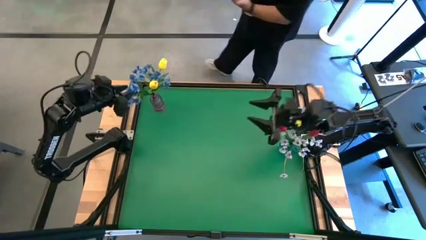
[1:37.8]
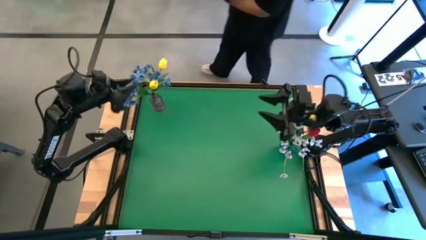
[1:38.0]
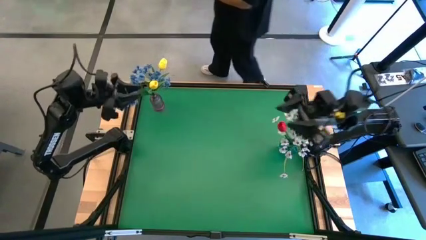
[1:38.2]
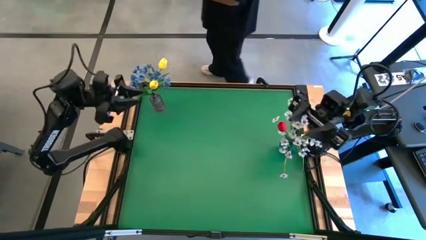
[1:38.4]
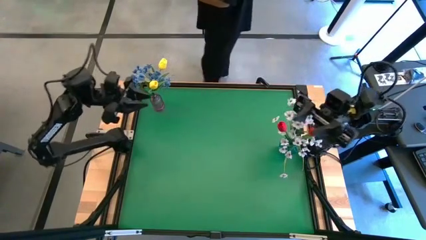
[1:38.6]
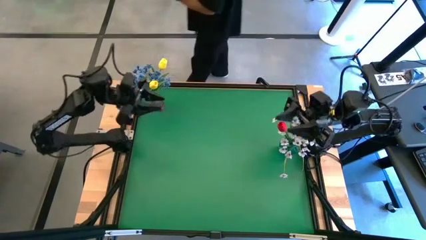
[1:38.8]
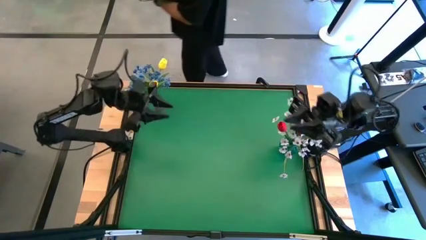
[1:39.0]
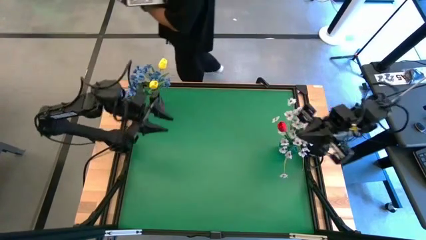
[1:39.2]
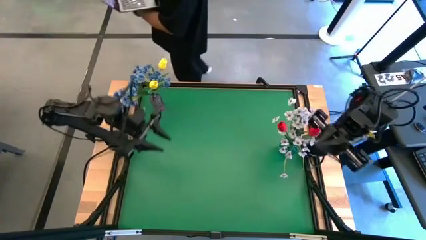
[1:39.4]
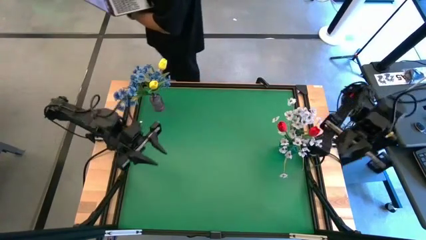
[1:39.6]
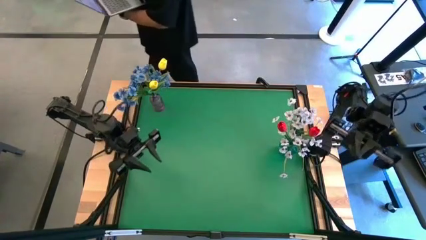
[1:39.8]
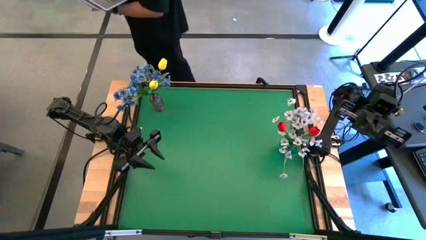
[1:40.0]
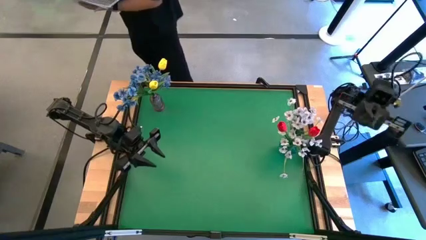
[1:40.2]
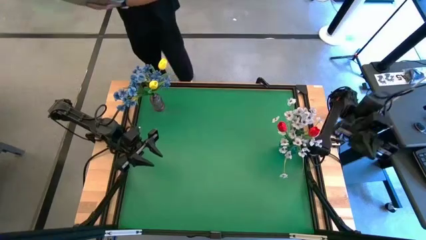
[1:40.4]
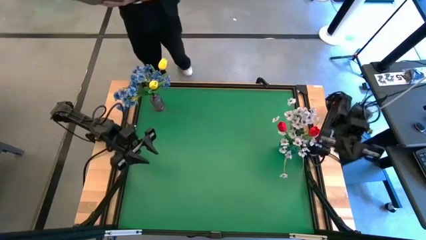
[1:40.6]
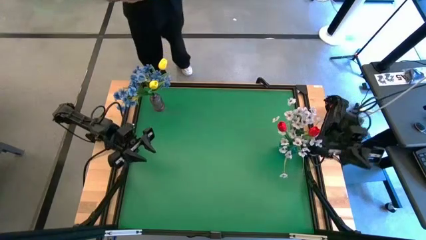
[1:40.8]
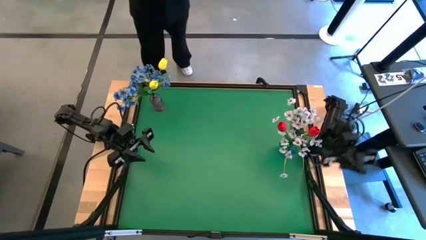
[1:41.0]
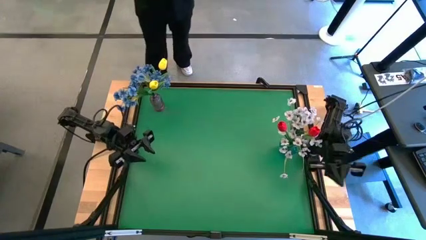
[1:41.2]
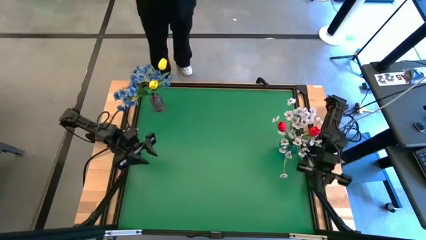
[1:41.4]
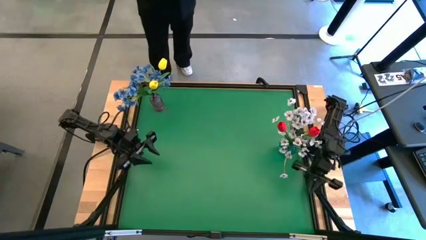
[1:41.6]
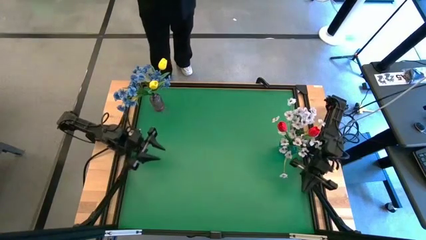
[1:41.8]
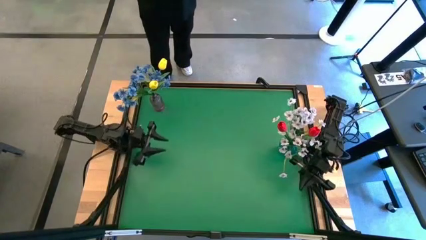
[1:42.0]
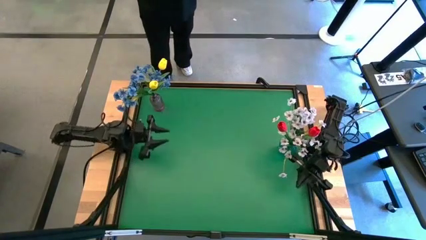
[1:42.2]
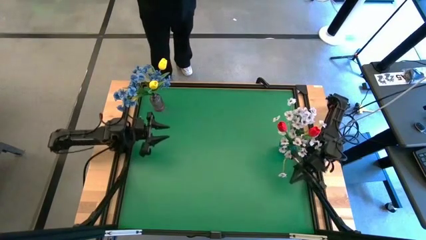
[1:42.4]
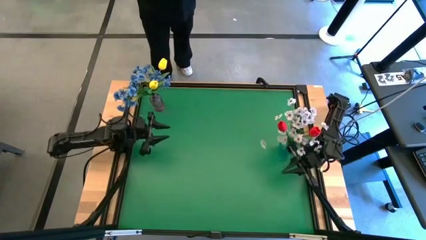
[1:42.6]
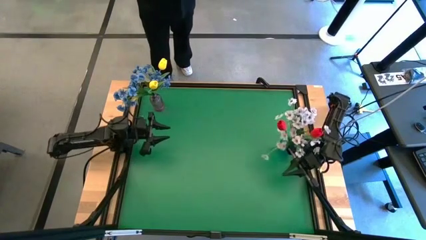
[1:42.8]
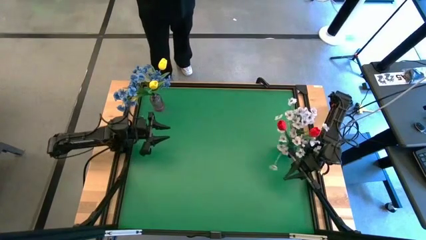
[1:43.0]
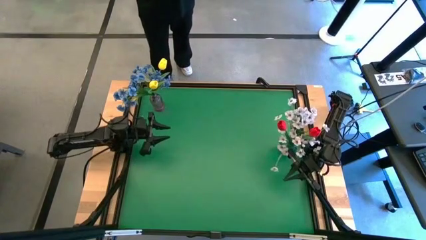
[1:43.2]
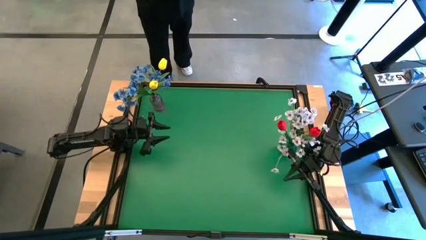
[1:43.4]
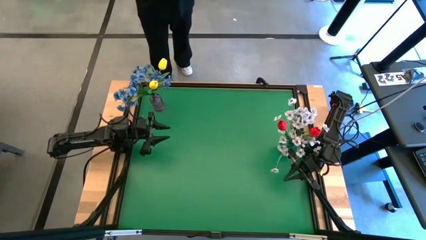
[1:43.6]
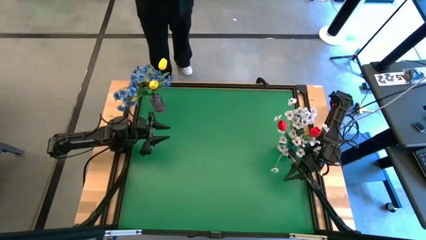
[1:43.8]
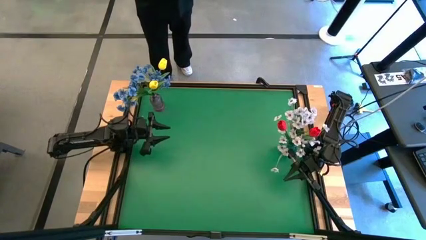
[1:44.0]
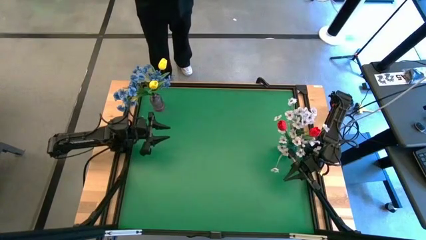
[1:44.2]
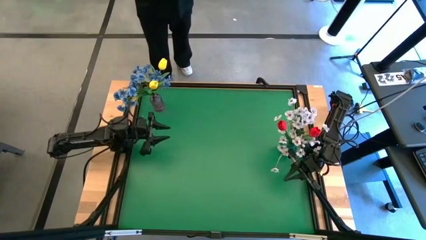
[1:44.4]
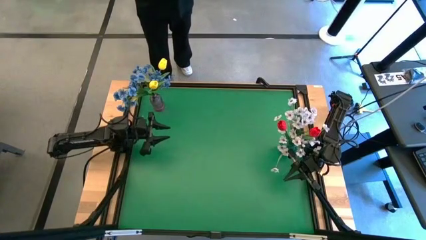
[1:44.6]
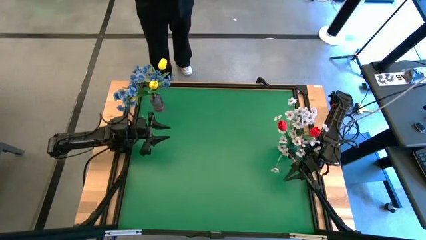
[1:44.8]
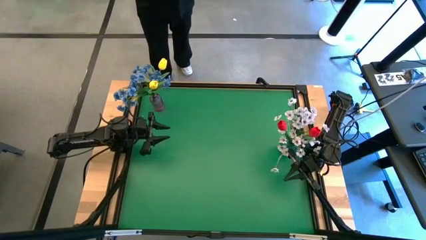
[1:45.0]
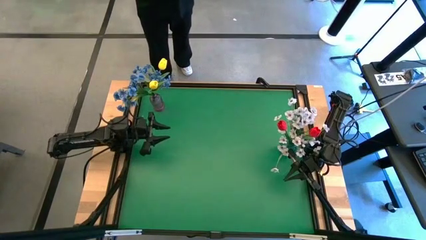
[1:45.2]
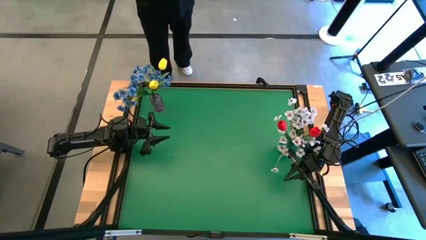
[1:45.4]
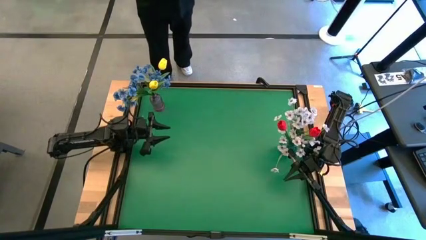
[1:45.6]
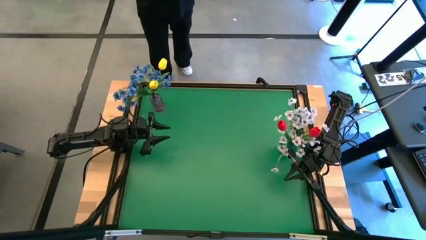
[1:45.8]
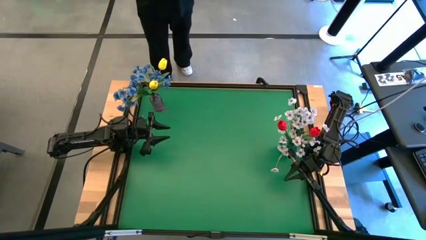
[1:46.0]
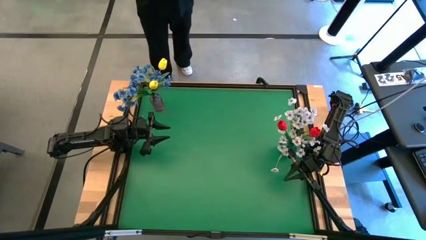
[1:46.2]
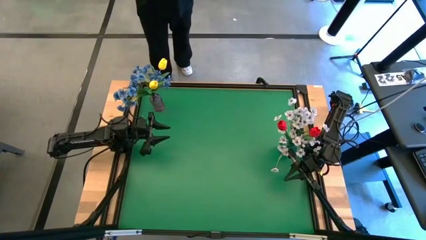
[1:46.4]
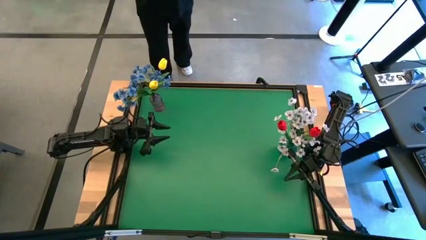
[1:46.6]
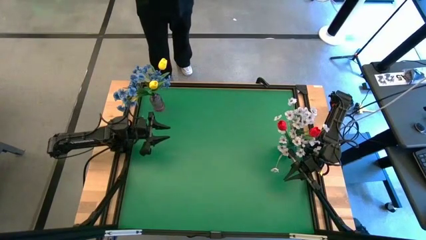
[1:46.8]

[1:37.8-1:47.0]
Task: Sort flowers into vase by color
Return to Home Position

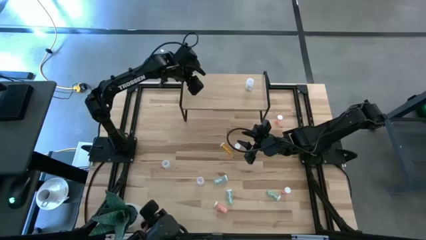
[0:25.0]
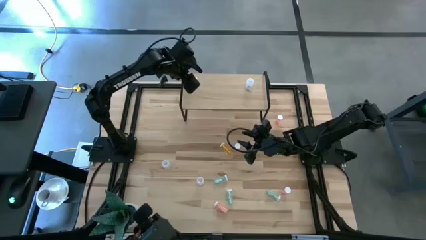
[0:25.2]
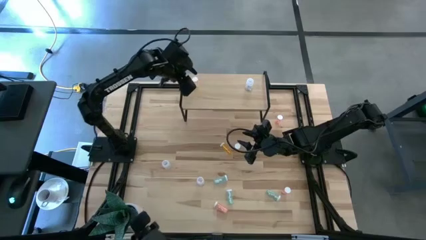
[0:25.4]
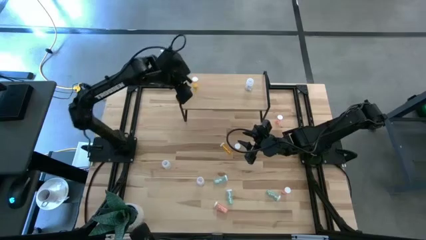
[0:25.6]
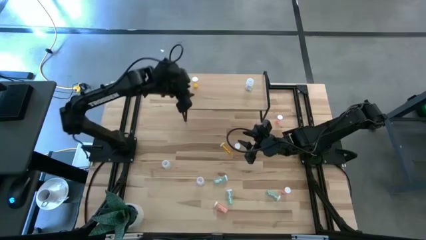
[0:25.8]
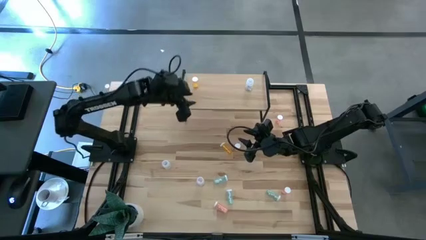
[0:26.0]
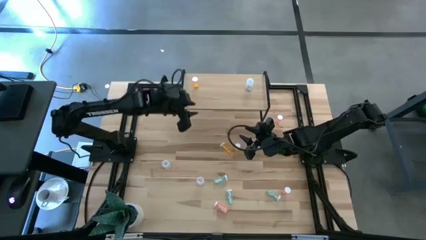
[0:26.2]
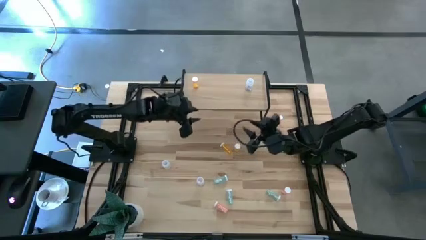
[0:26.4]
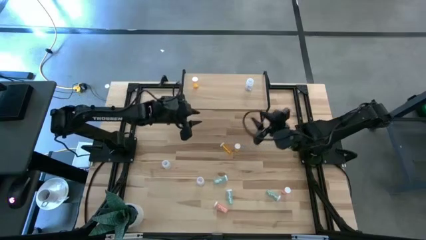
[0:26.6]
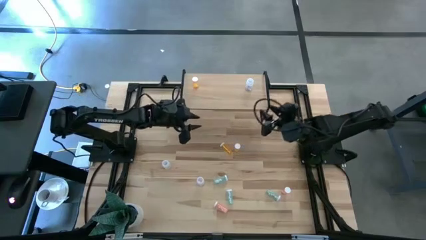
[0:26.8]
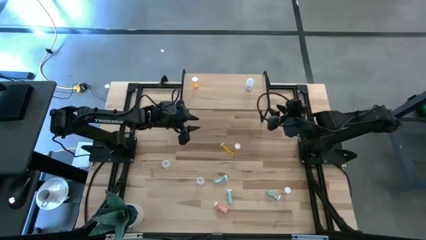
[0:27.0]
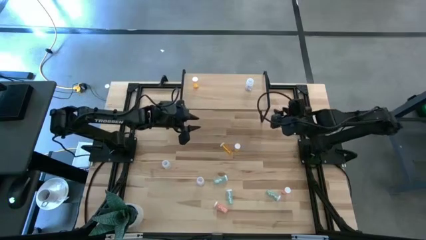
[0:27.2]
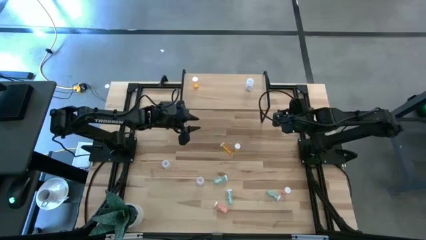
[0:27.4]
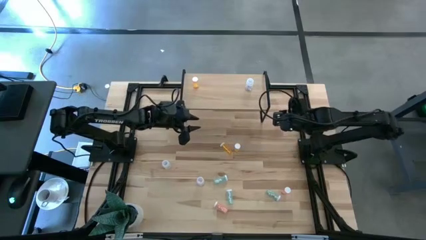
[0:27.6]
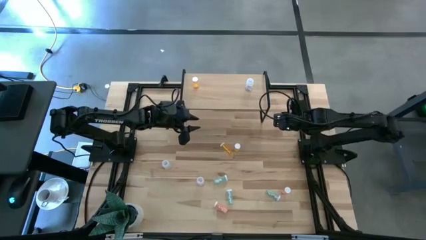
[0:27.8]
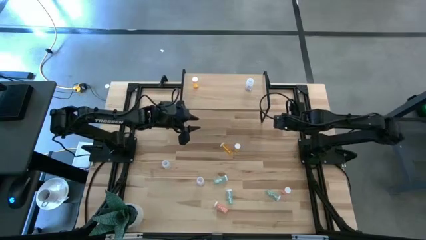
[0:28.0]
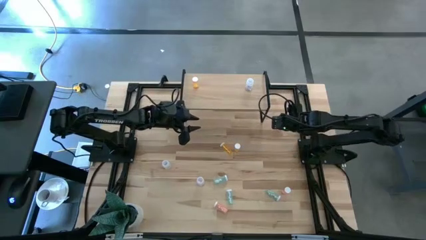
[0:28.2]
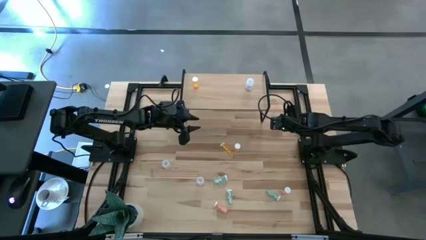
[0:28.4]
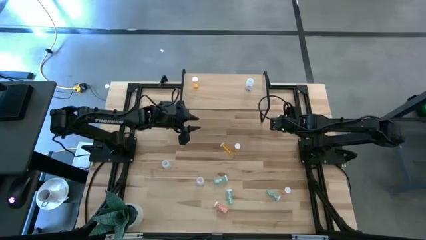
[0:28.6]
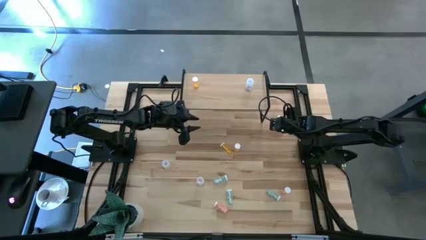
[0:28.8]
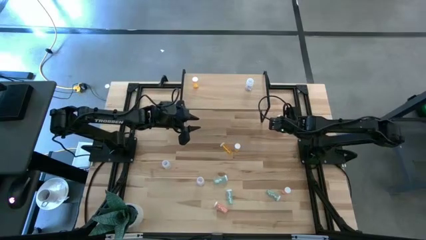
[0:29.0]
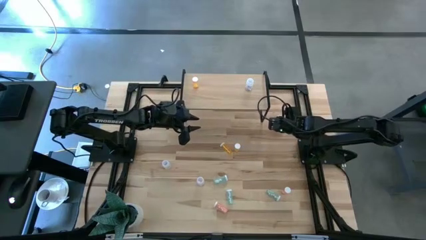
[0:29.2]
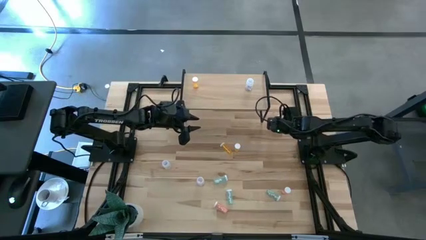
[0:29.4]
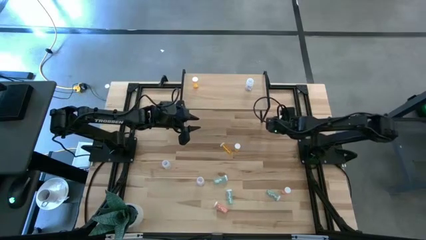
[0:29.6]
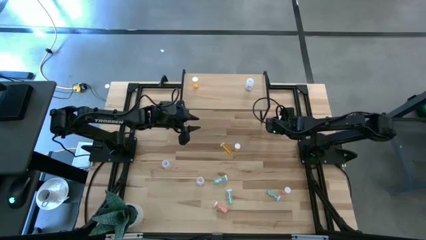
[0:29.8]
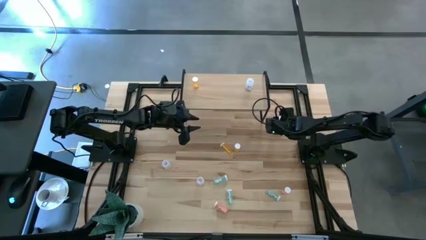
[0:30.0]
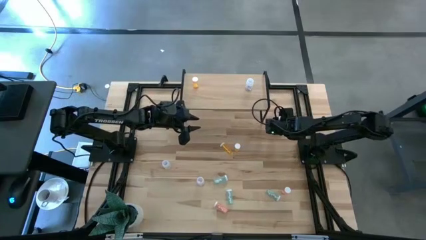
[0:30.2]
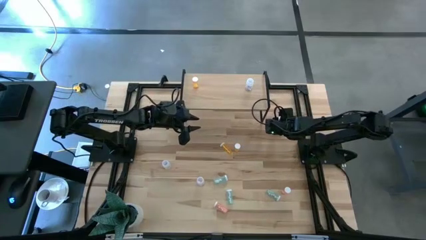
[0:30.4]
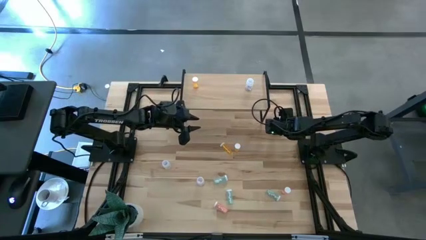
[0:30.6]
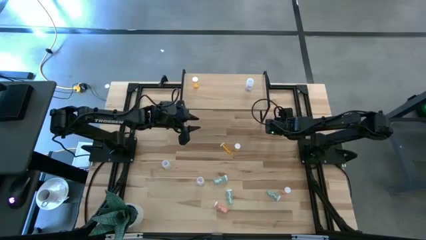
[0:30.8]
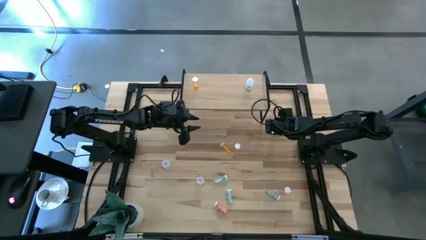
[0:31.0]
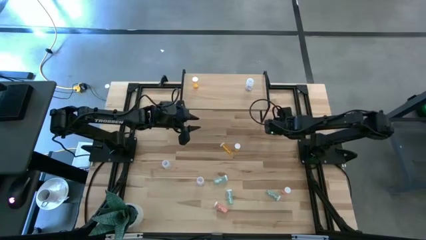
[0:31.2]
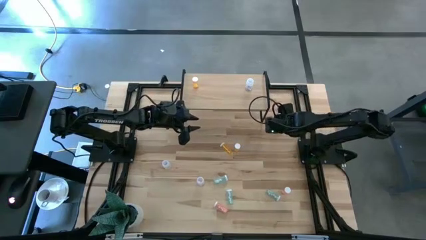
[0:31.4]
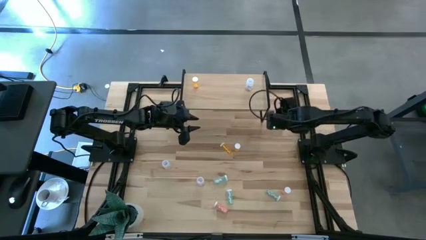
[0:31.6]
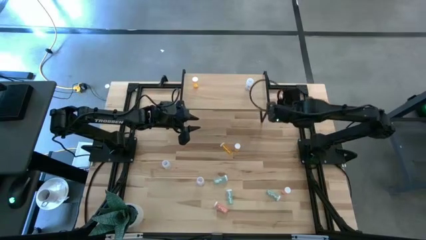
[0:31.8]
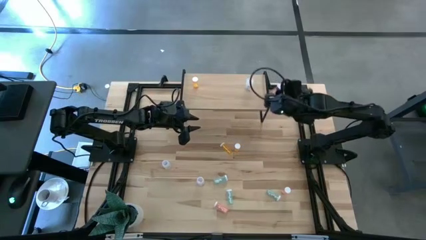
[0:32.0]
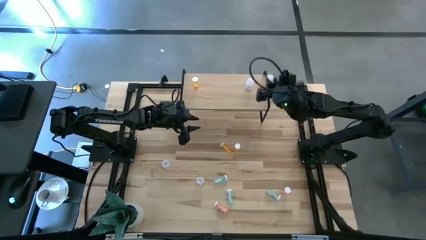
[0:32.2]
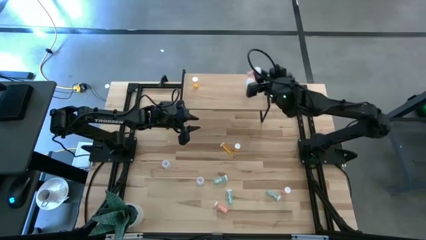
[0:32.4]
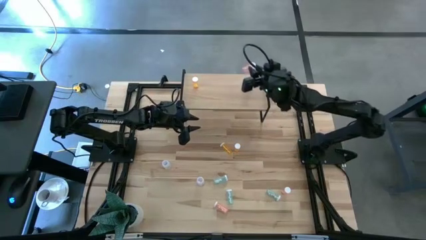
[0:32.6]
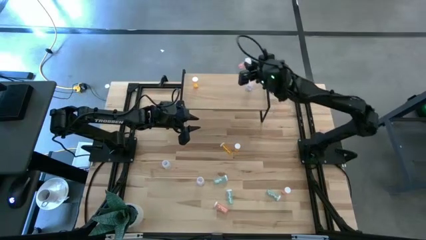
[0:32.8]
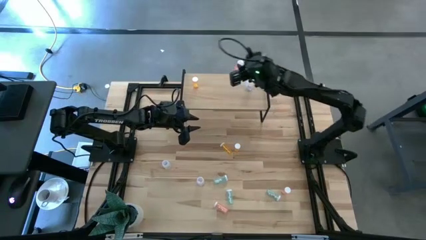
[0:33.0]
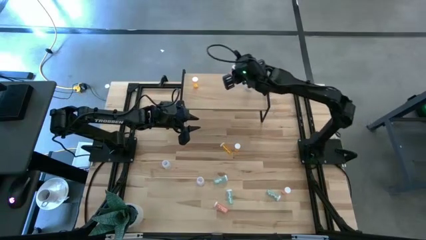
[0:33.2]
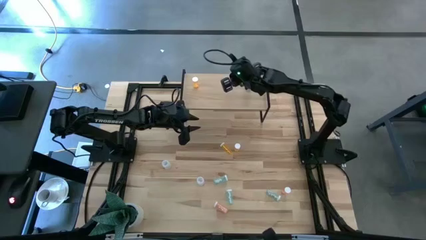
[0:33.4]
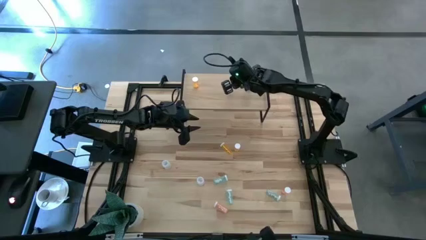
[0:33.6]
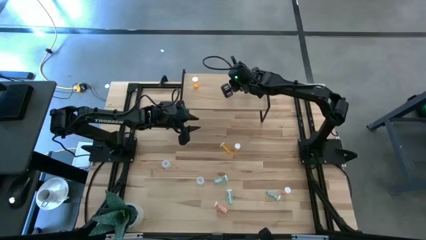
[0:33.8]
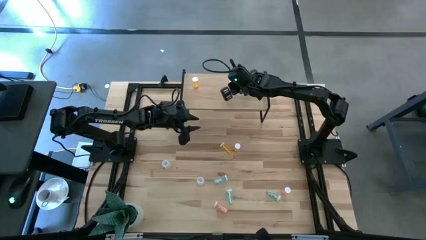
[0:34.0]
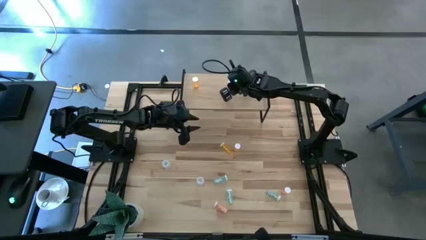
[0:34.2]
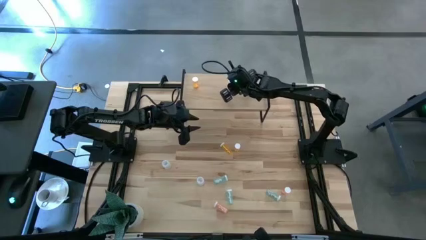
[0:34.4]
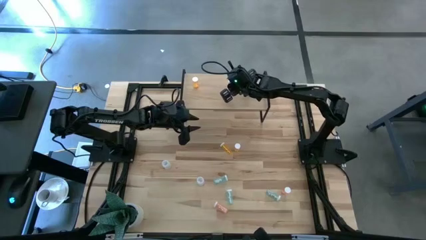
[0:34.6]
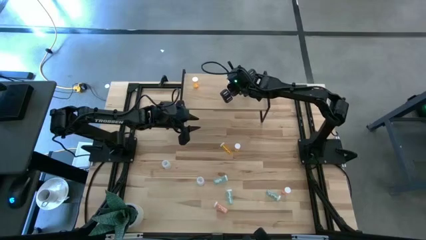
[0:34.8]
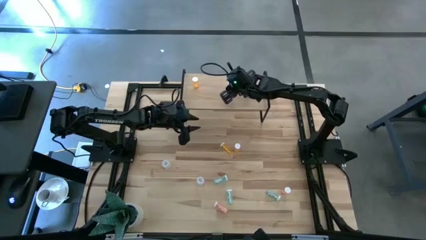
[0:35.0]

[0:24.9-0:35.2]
Task: Pick and place medicine bottles onto shelf by color
Put the pink pill bottle on the shelf
